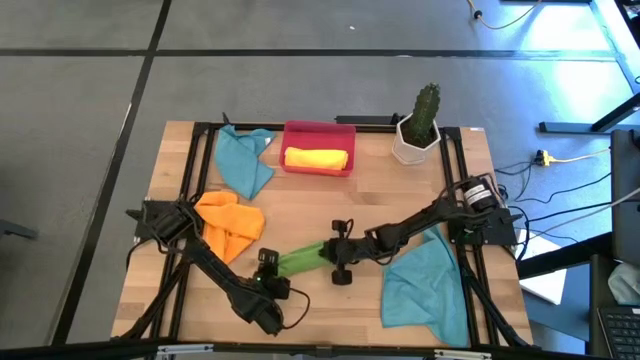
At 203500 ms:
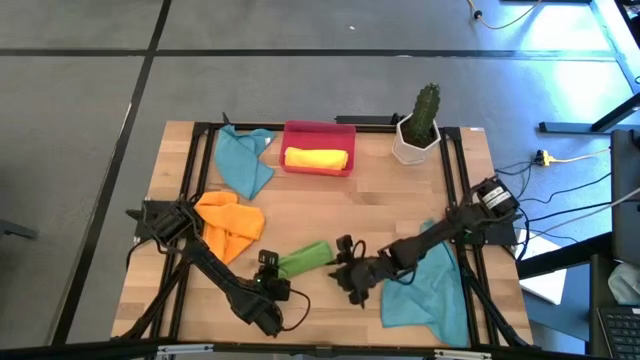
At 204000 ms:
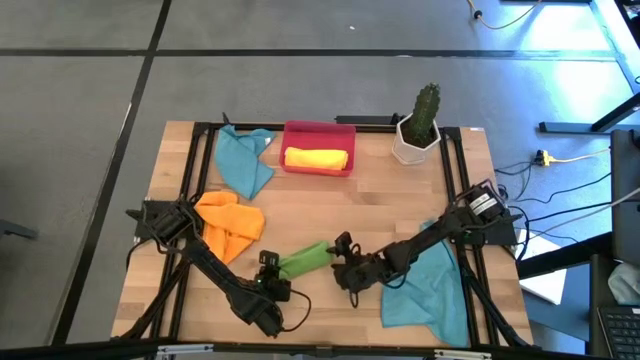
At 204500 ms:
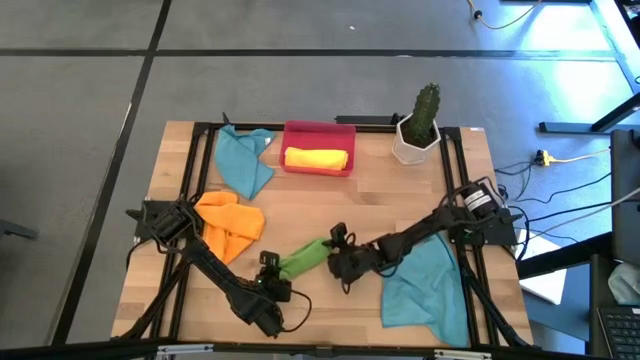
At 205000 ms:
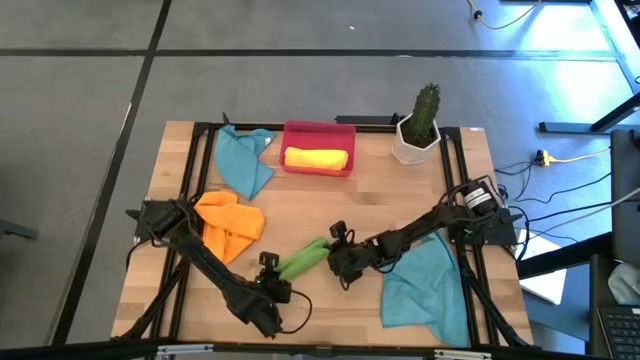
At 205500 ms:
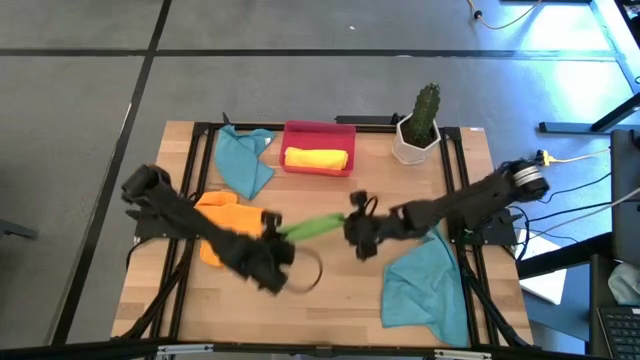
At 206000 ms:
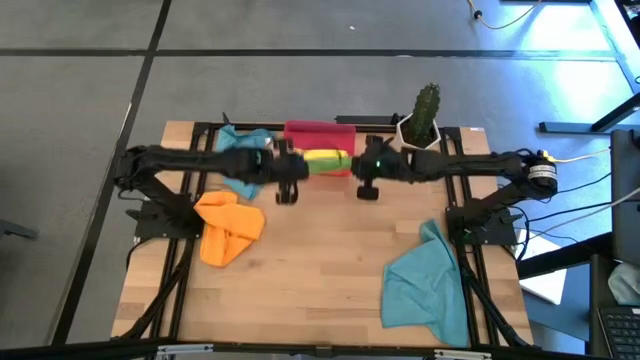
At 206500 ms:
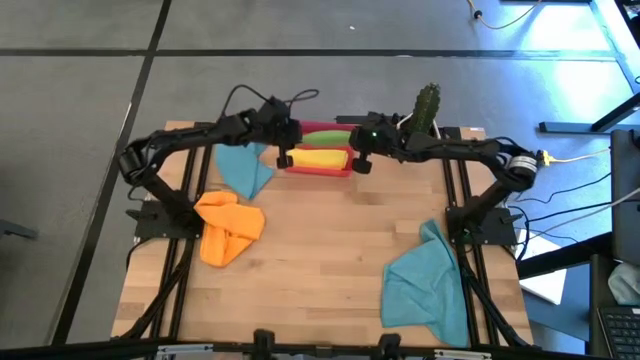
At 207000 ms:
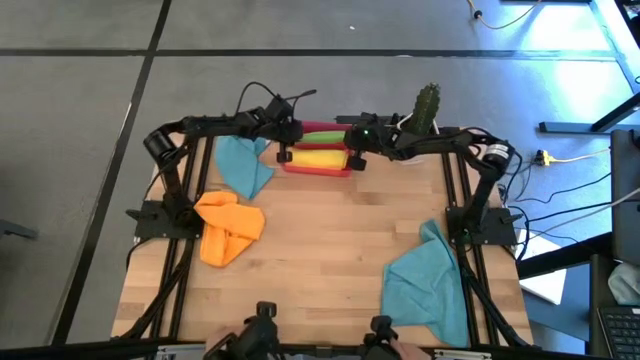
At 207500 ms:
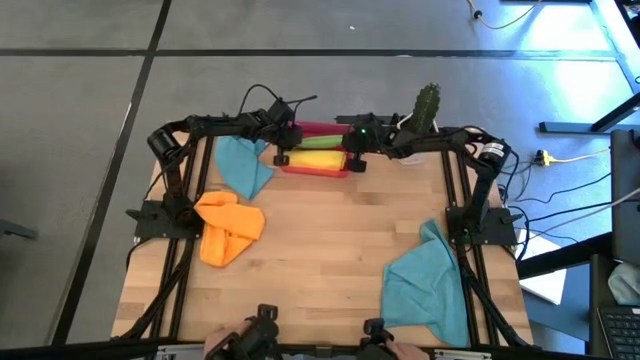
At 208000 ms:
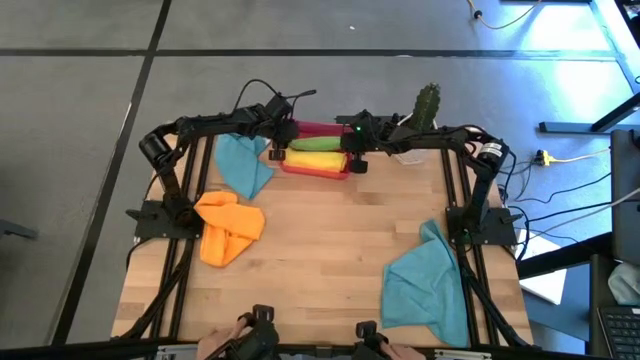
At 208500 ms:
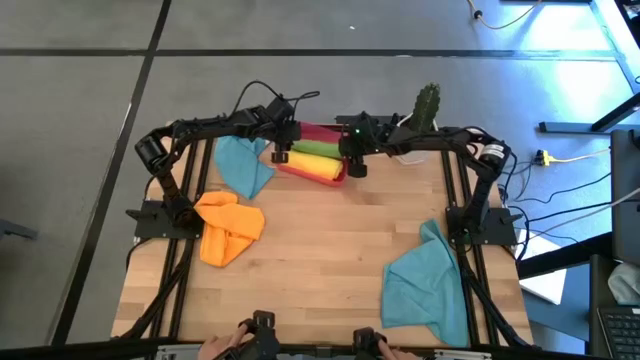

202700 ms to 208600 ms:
Task: Roll microfiber towels into tight, uniform cylinder then place into a basket
Put the rolled green towel into the red bin

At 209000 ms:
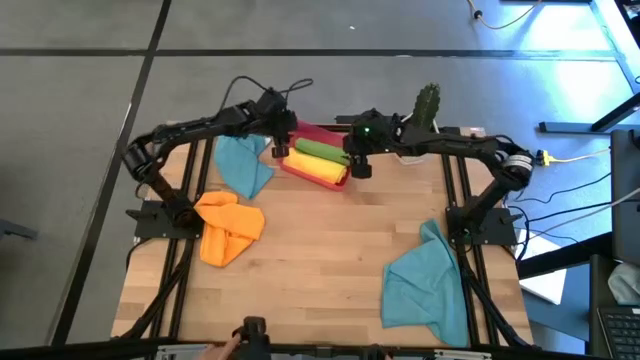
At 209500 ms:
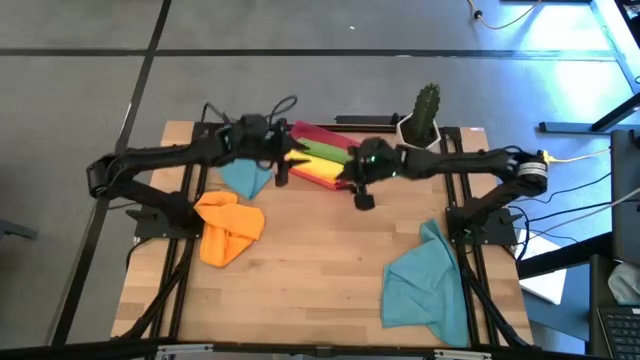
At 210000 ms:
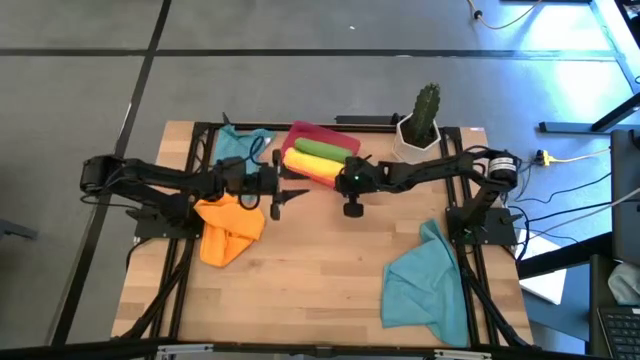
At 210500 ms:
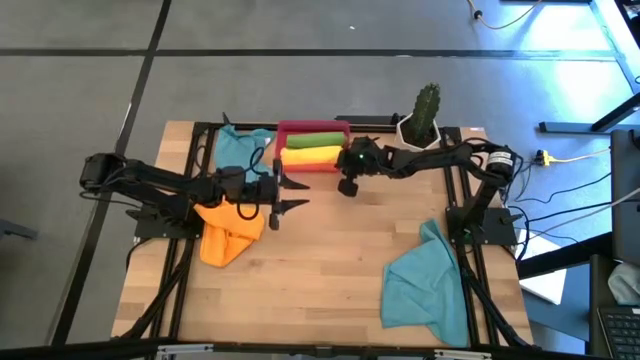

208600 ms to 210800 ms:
Adjust the red bin

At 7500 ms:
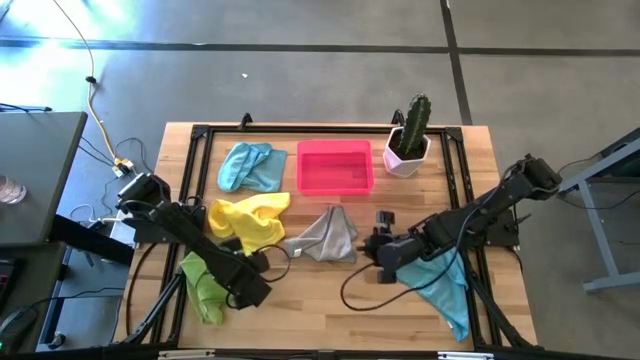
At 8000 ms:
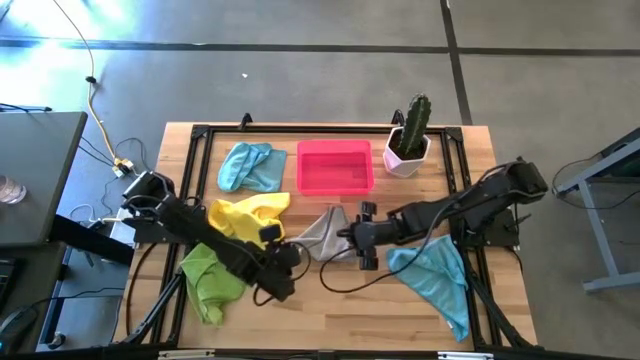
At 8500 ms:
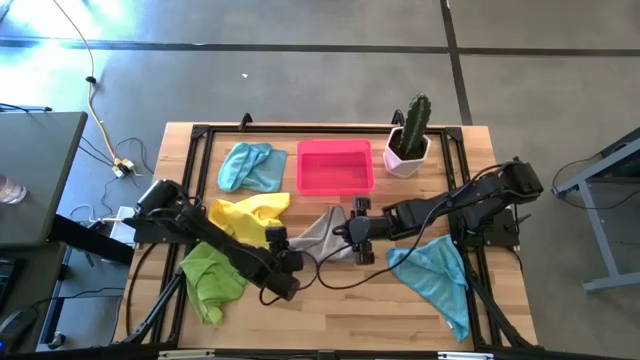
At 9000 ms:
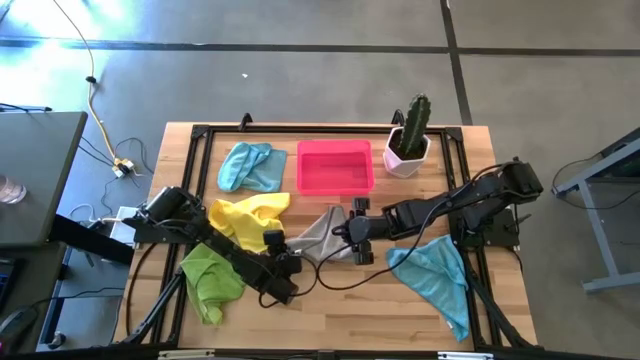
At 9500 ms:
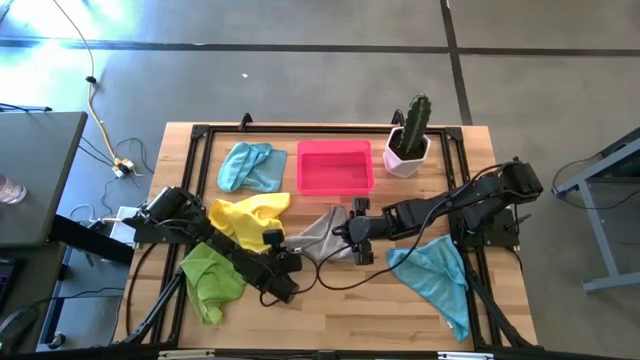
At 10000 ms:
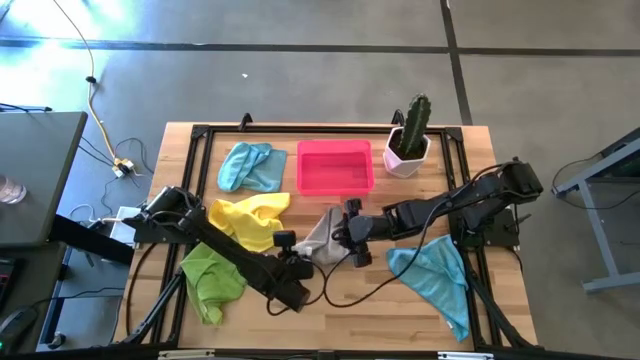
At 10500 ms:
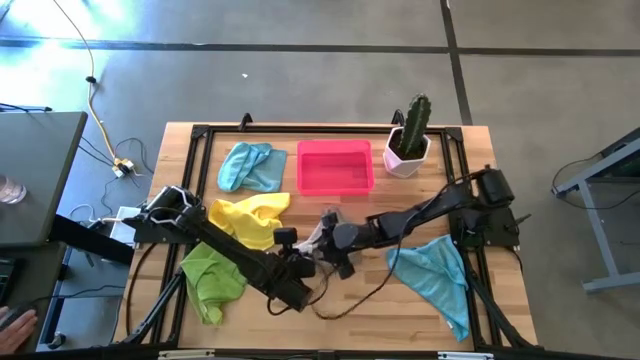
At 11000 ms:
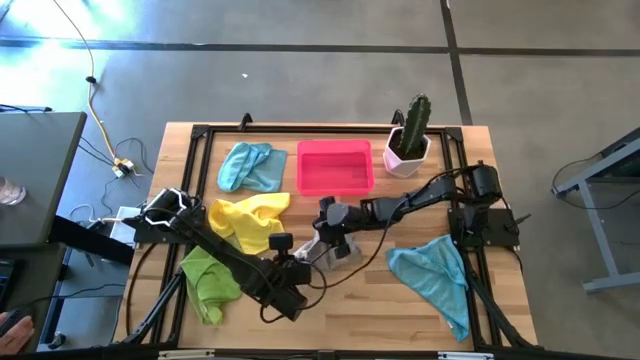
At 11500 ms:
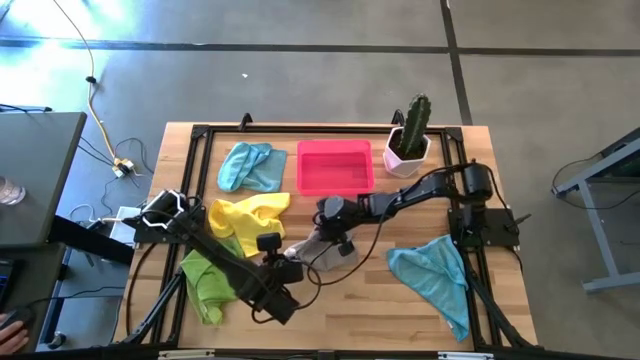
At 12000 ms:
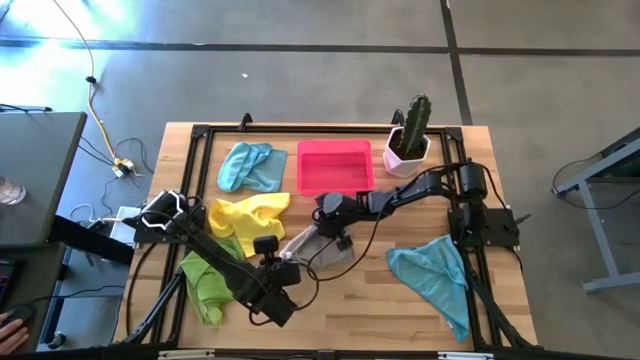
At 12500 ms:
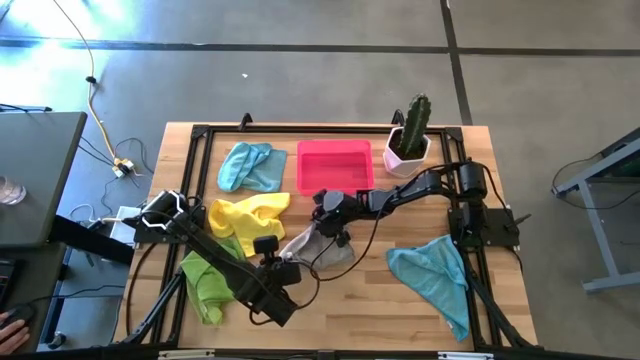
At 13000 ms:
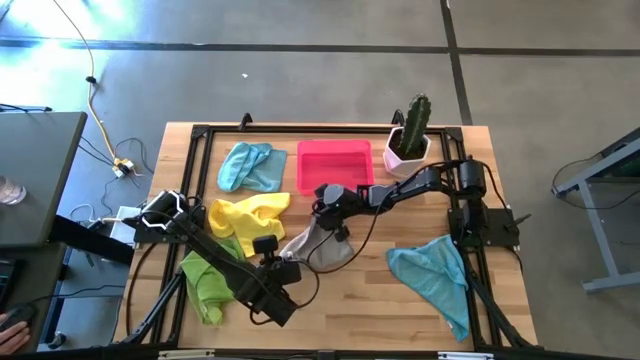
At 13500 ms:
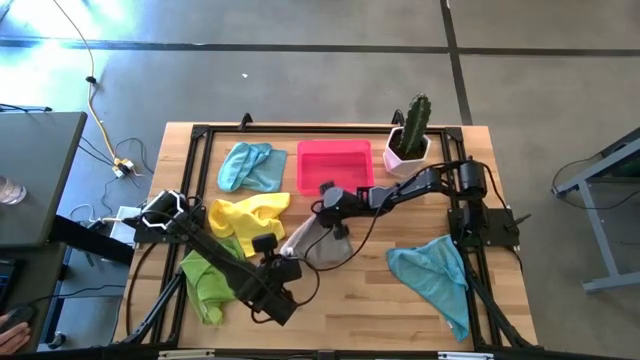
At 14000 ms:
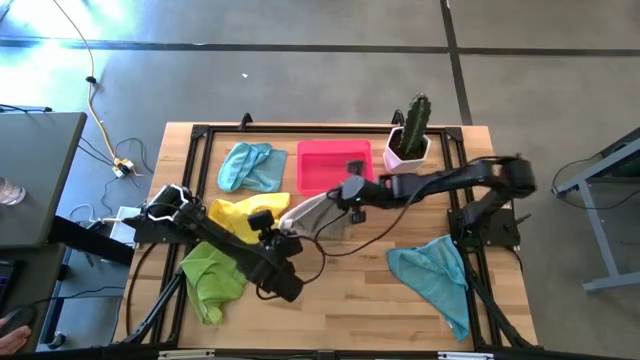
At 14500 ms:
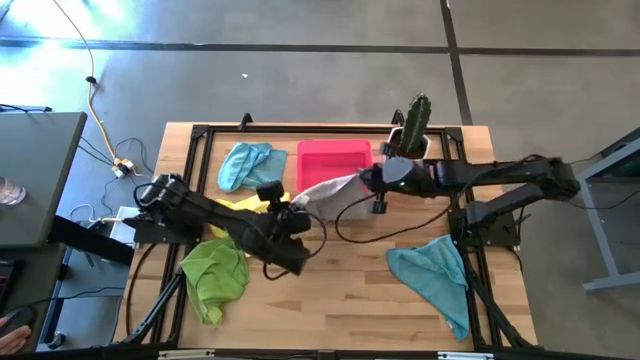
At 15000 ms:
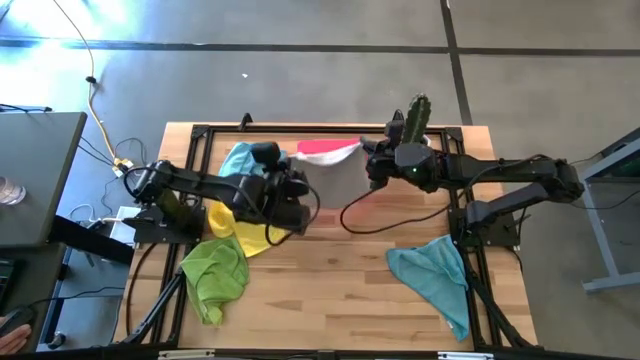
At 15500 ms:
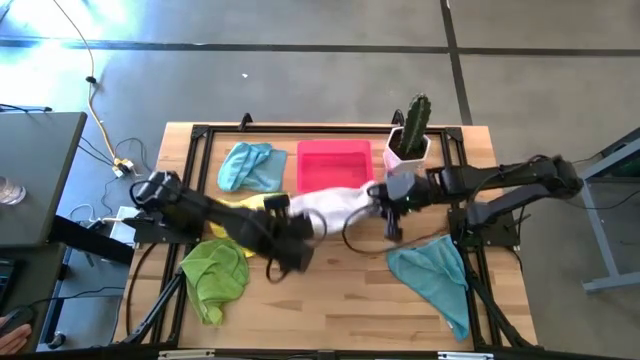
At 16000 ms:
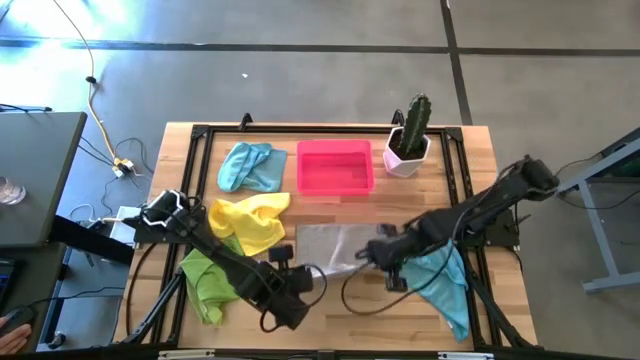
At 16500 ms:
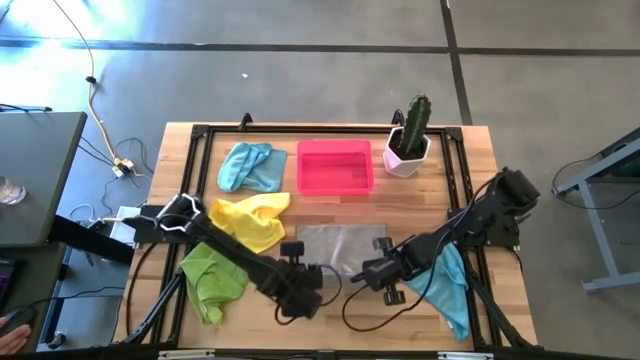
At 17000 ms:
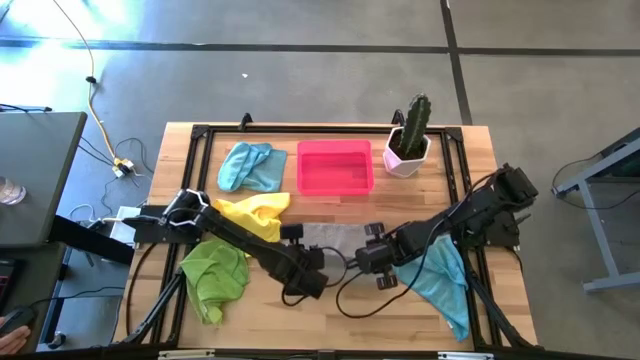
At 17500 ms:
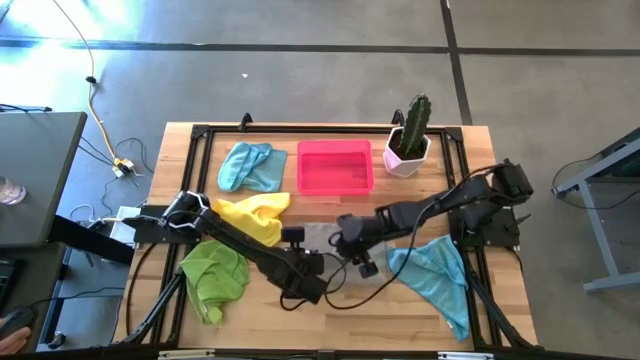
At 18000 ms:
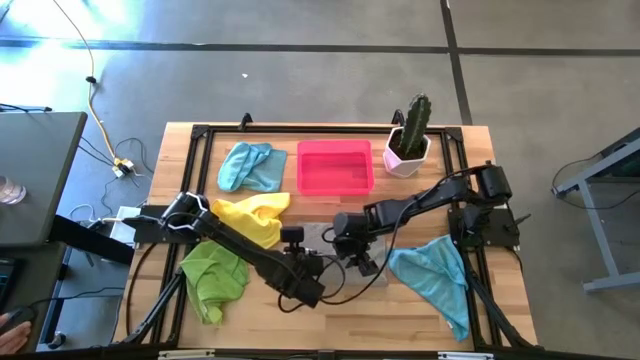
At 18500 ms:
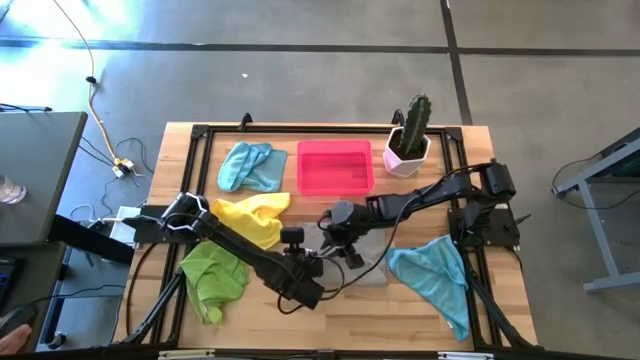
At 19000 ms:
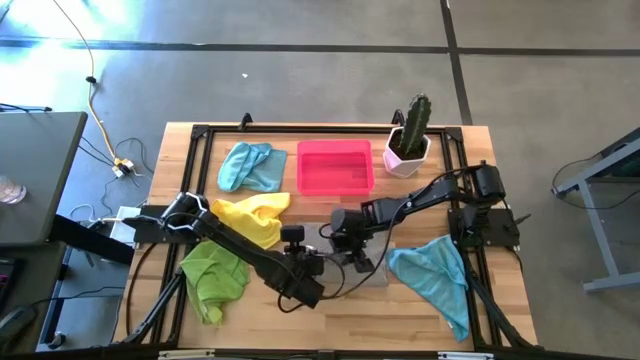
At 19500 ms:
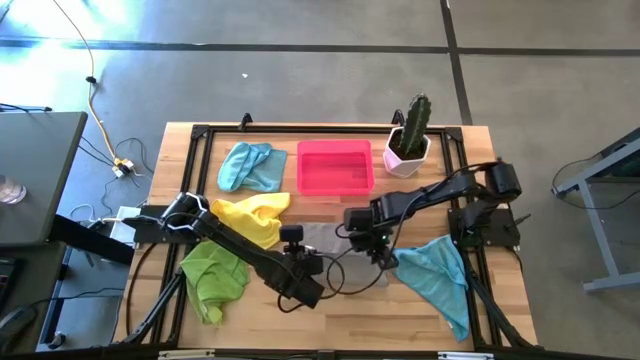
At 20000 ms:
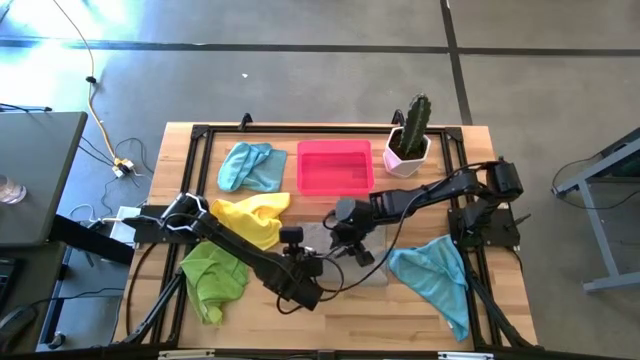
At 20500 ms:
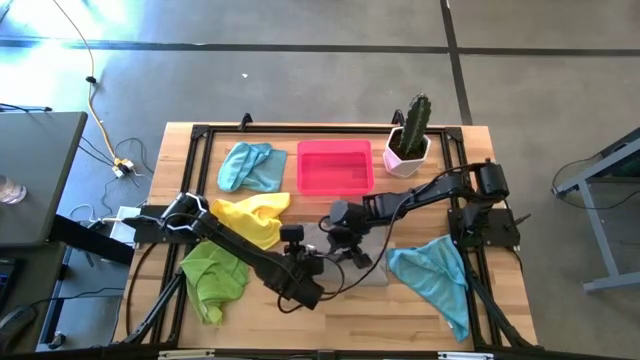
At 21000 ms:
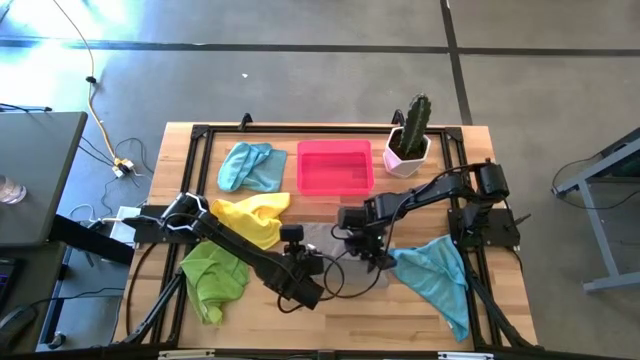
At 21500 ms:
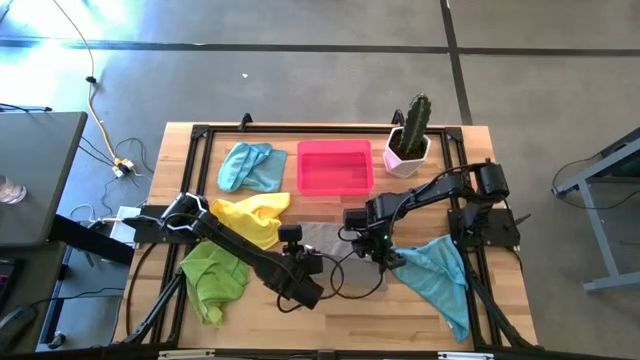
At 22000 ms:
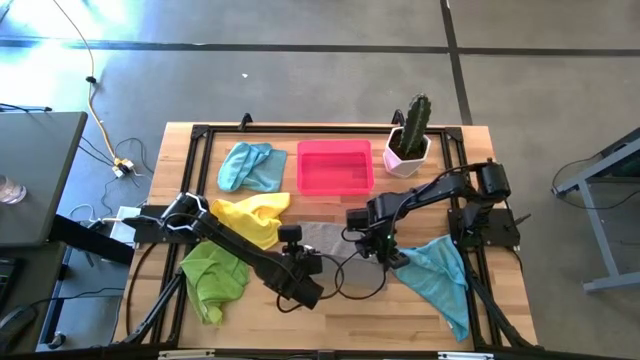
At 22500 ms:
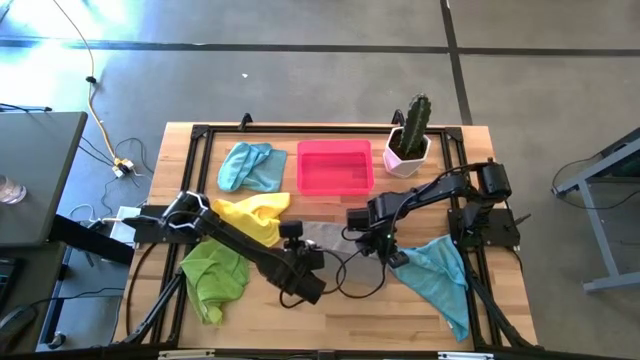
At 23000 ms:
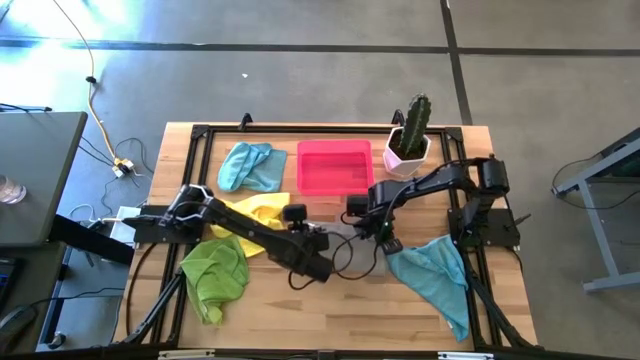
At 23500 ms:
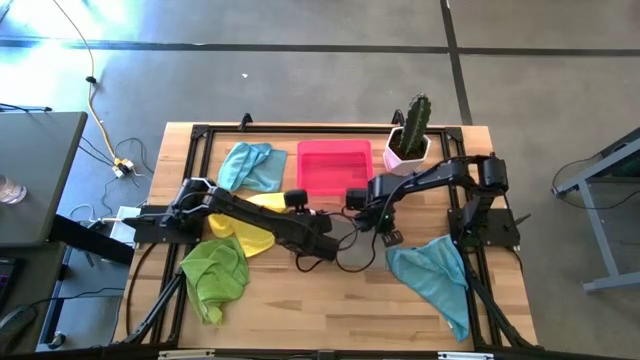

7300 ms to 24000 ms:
Task: Fold microfiber towels
Fold the gray microfiber cloth
